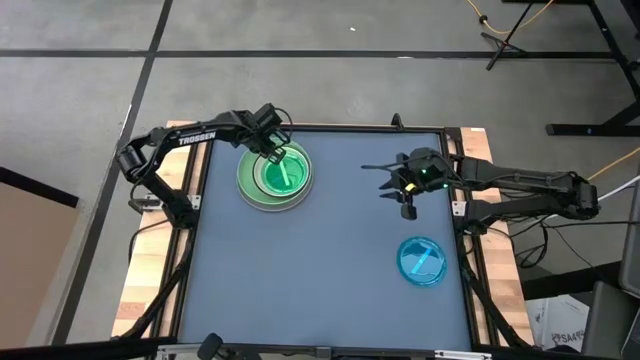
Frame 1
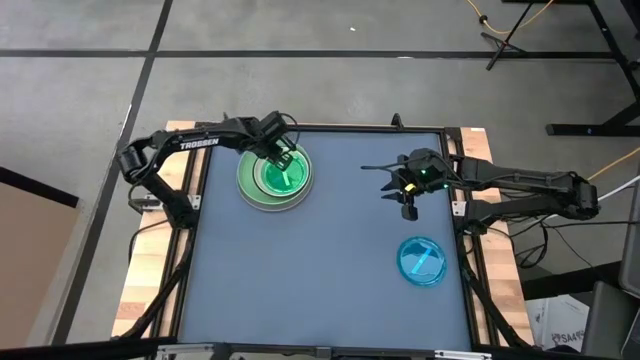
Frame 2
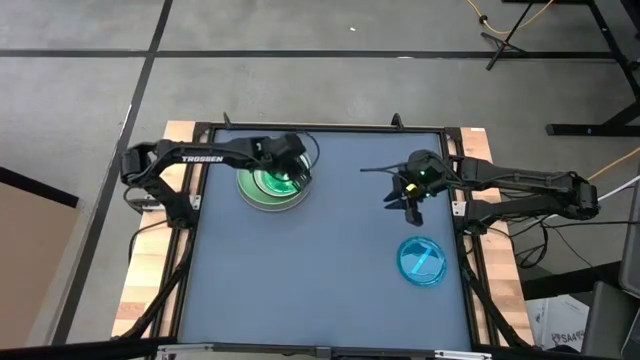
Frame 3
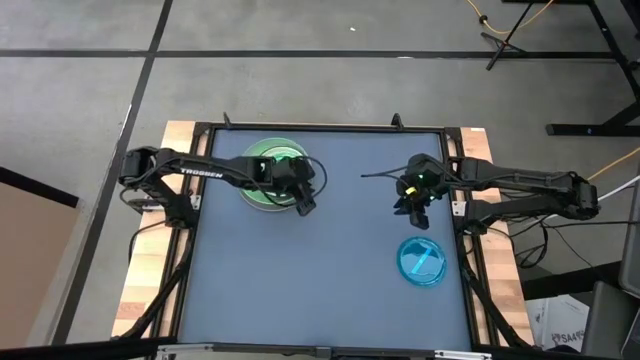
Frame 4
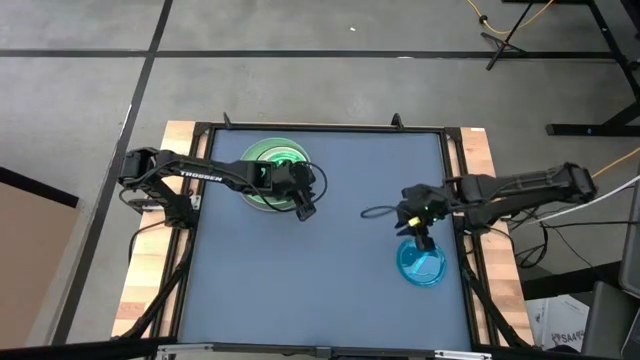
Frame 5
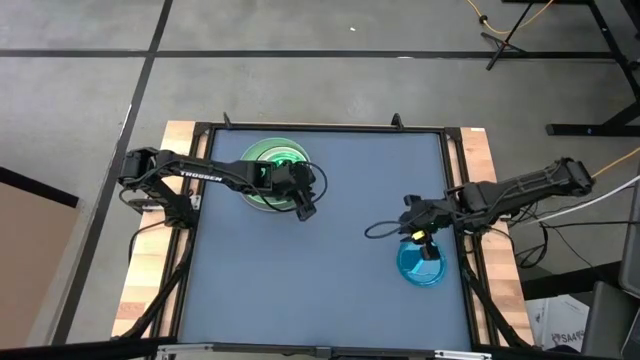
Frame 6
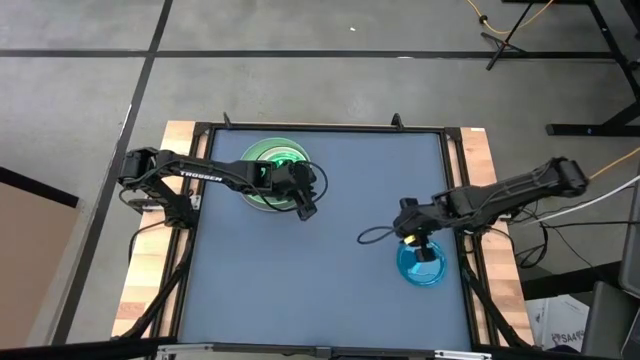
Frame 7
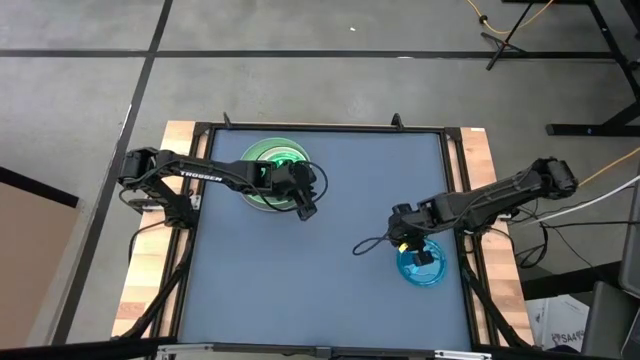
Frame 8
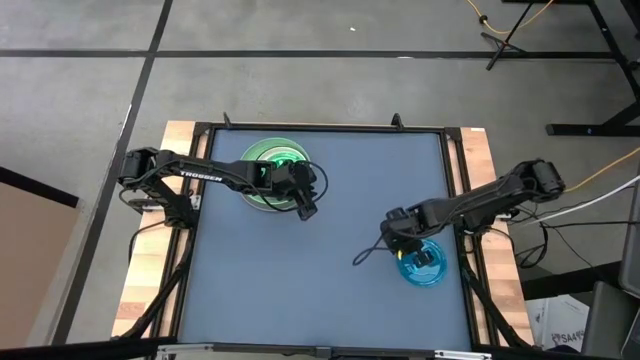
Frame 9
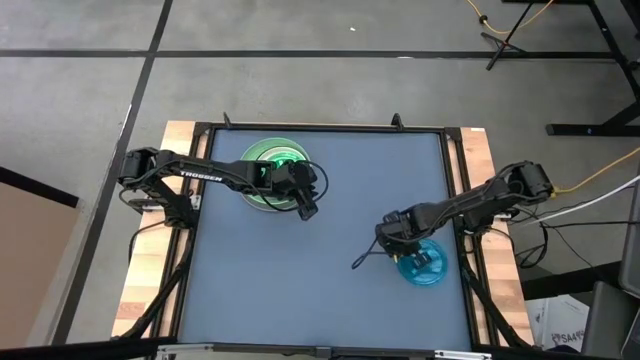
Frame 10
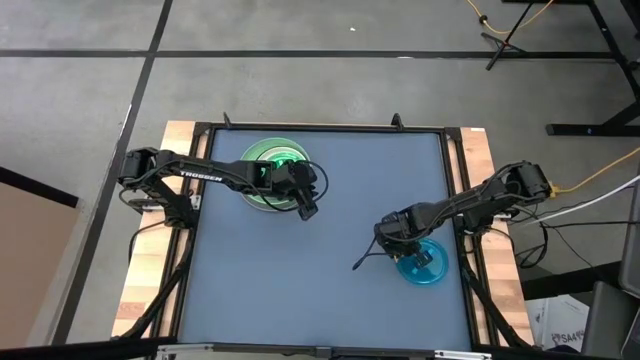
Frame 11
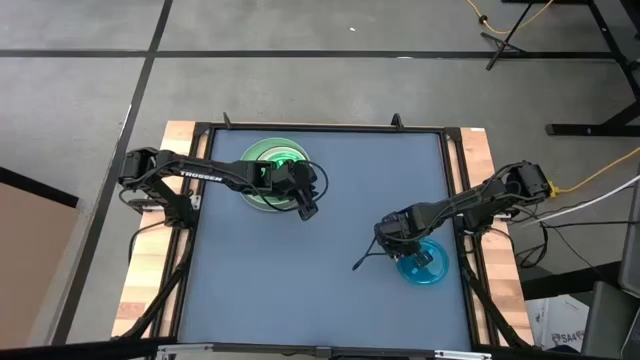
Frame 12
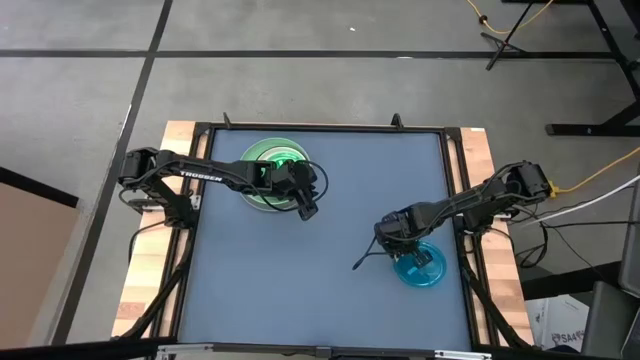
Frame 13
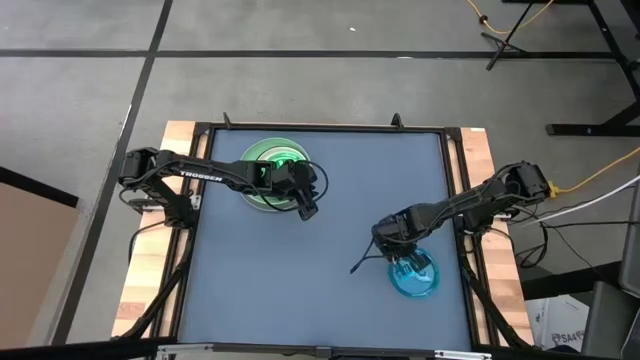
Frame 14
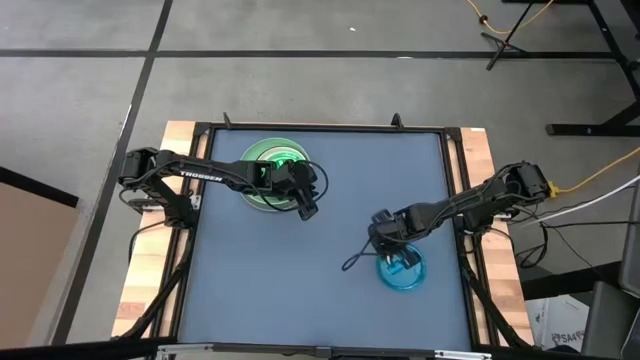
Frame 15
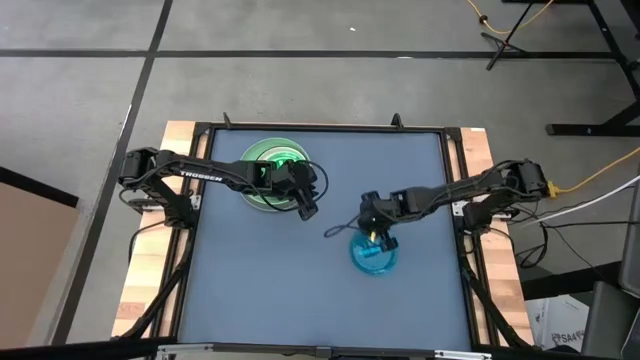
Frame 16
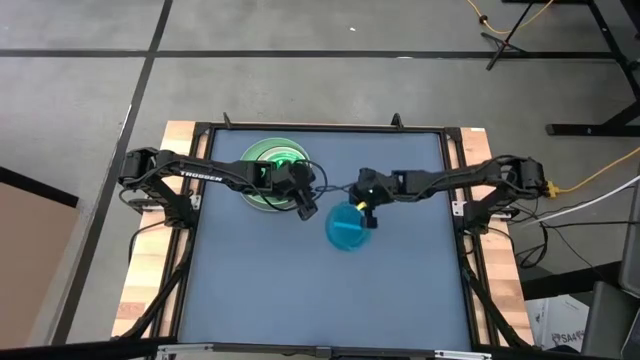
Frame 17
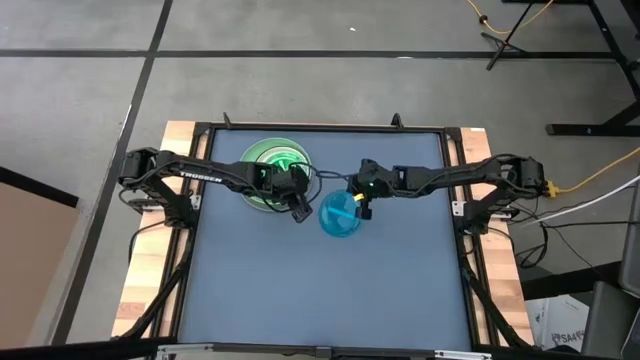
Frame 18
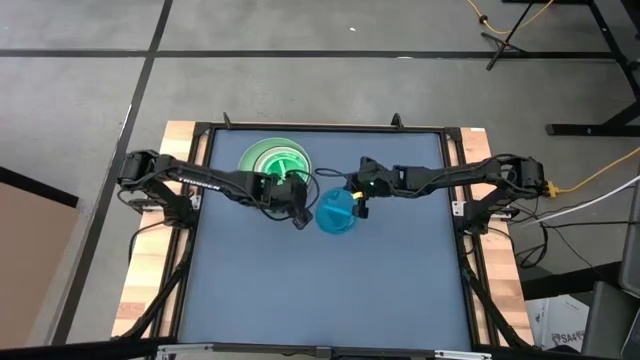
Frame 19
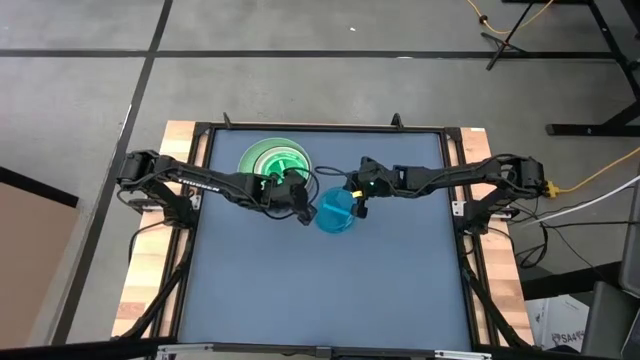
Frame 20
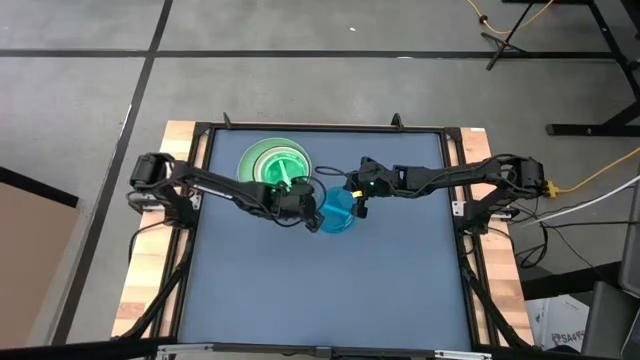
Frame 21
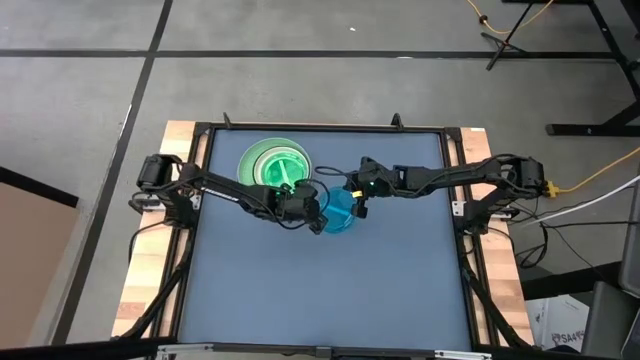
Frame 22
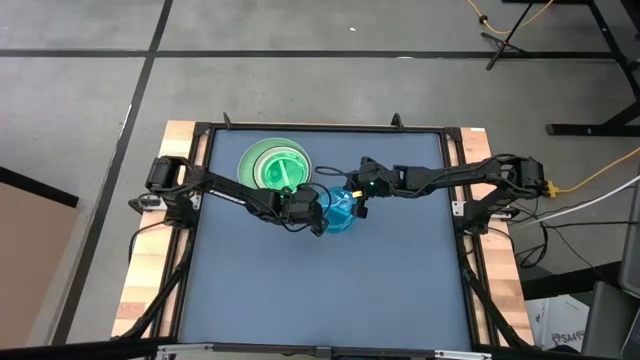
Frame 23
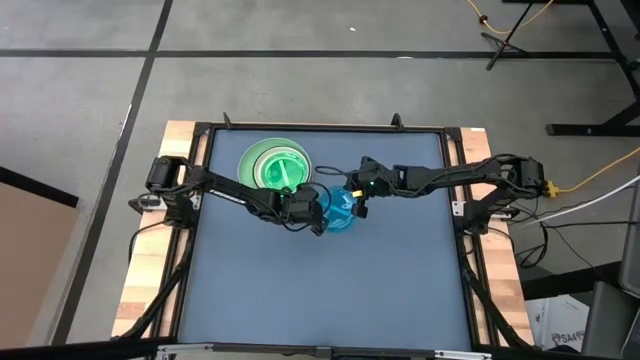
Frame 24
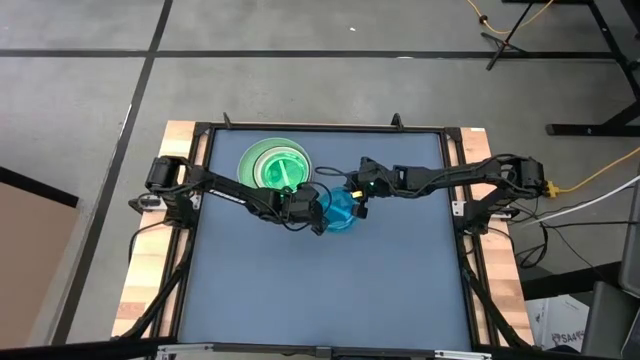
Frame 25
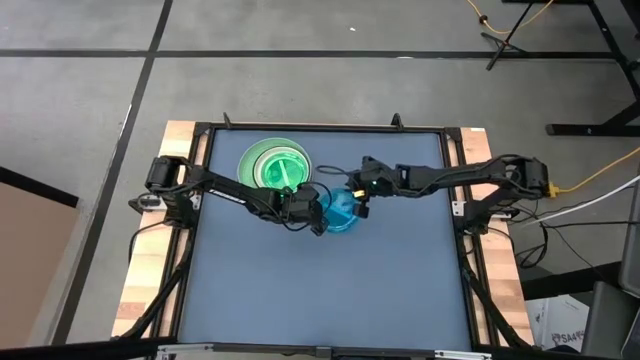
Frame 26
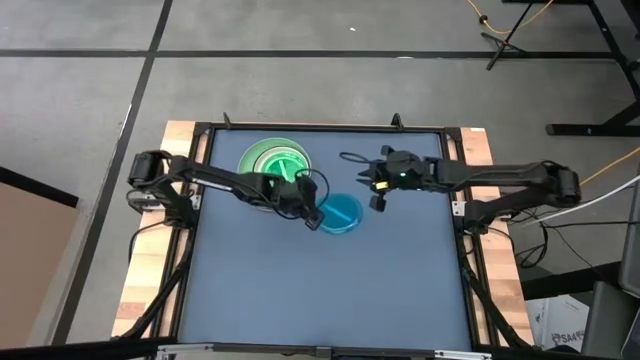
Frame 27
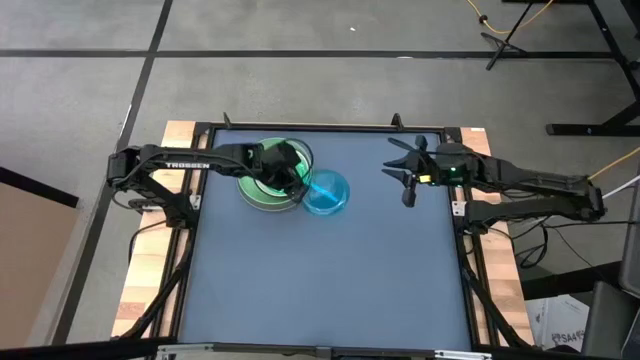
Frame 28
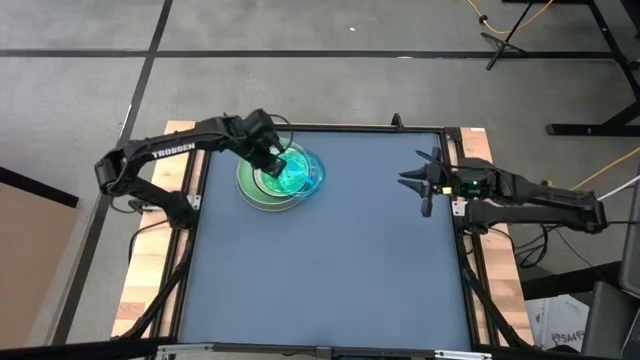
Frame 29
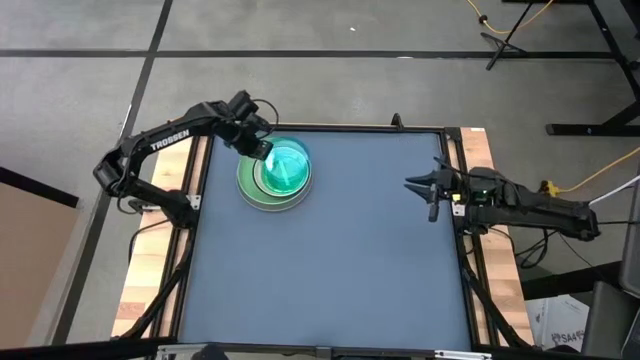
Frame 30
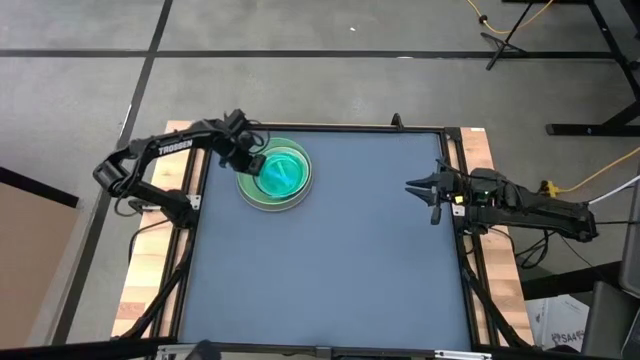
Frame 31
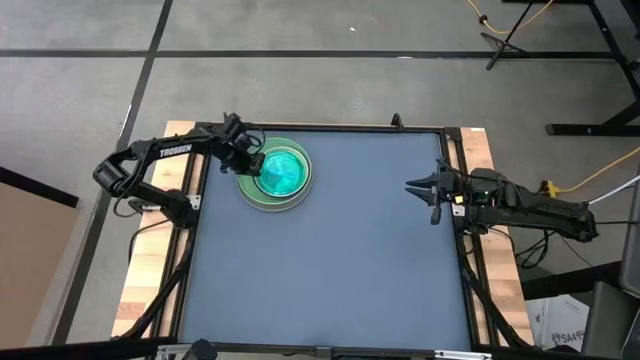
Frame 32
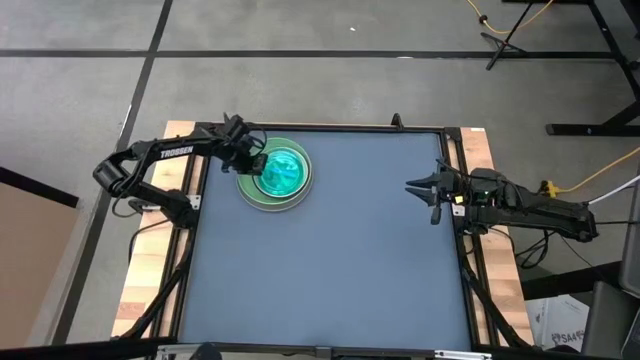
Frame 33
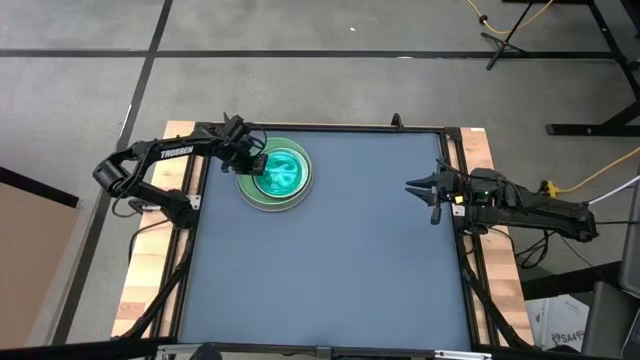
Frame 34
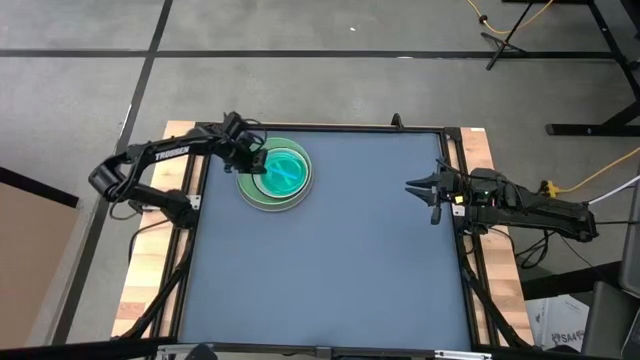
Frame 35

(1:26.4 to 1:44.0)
Task: Stack plastic plates
Stack the blue plate on top of the light green plate

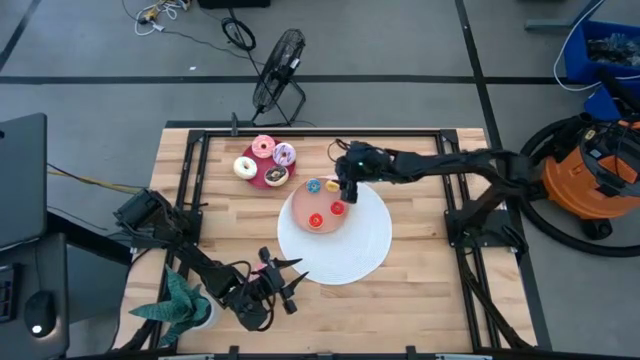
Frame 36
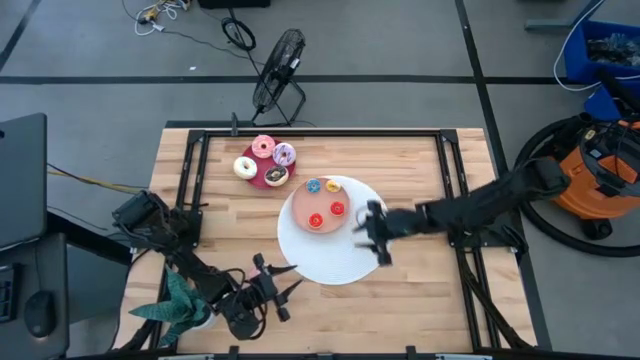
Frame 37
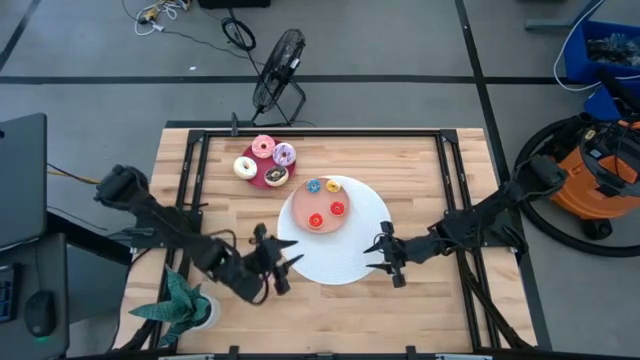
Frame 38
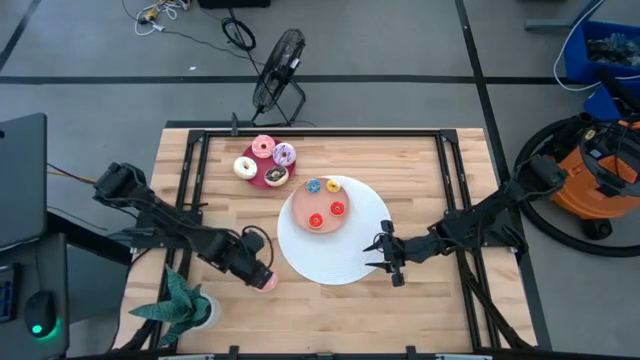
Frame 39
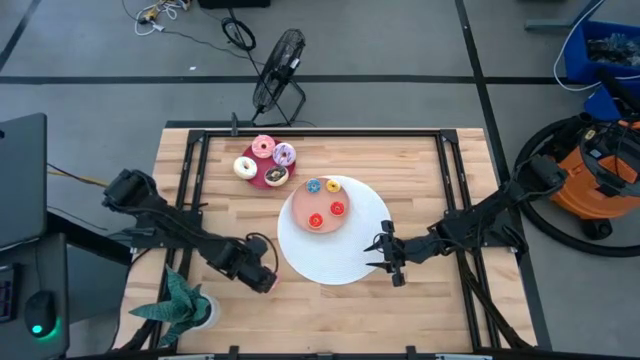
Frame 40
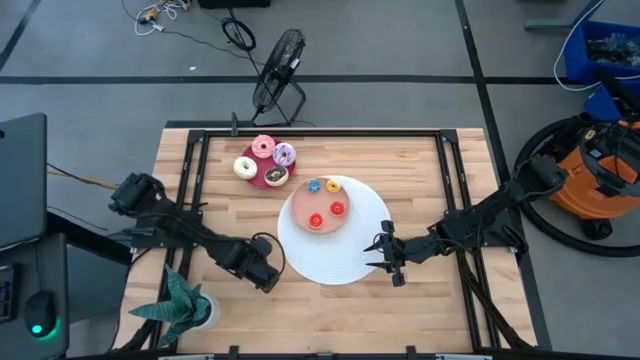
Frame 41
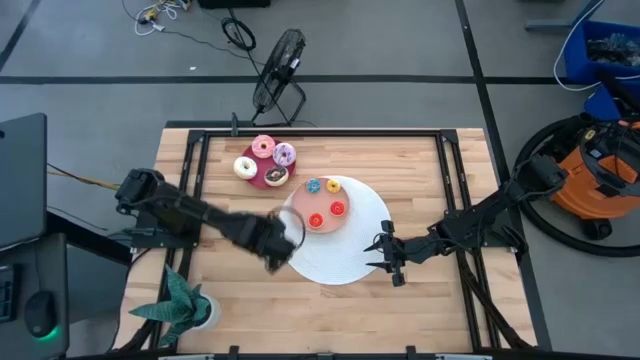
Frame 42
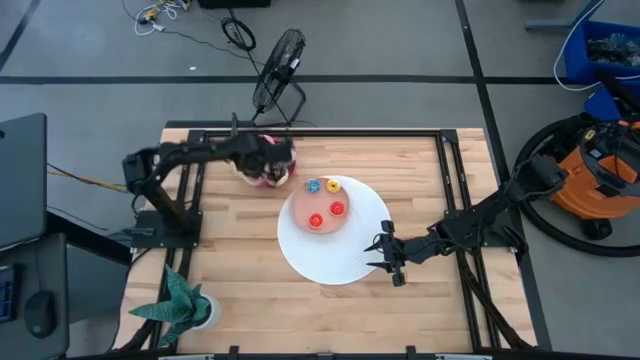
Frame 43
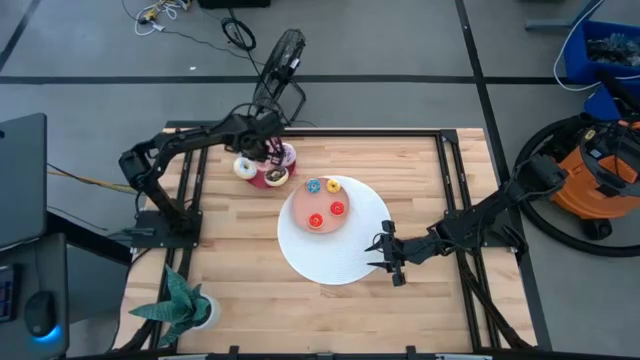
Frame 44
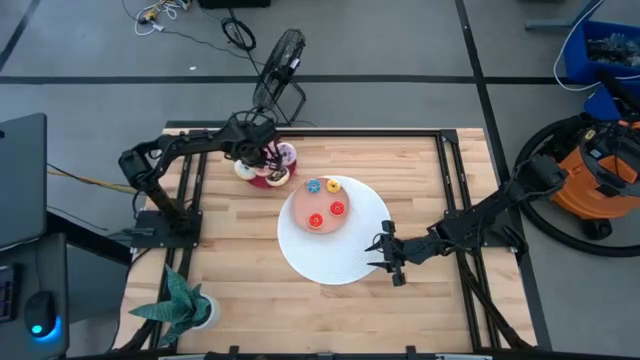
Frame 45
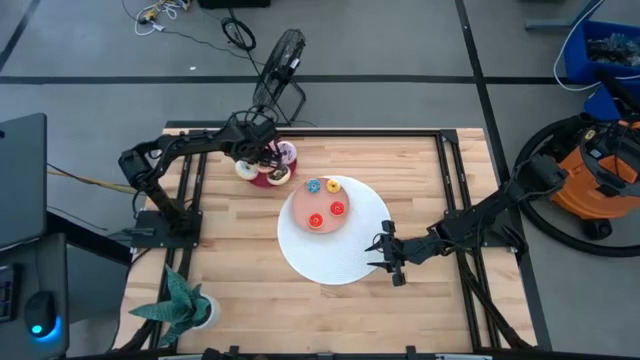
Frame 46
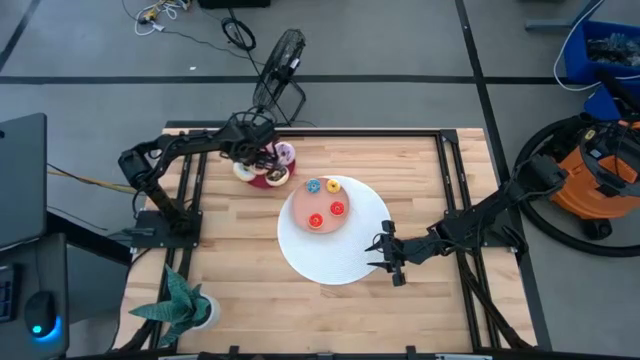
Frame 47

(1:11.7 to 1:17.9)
Task: Pick & Place donuts
Put the big pink donut on the dark pink plate
